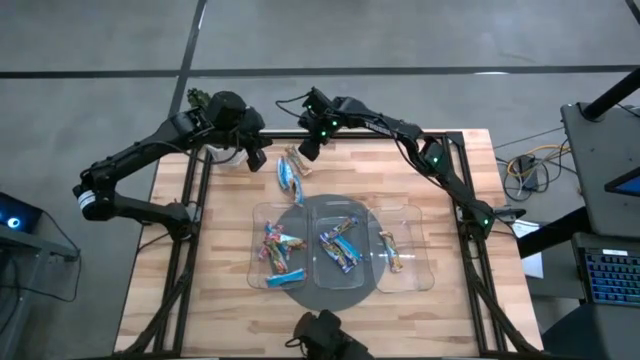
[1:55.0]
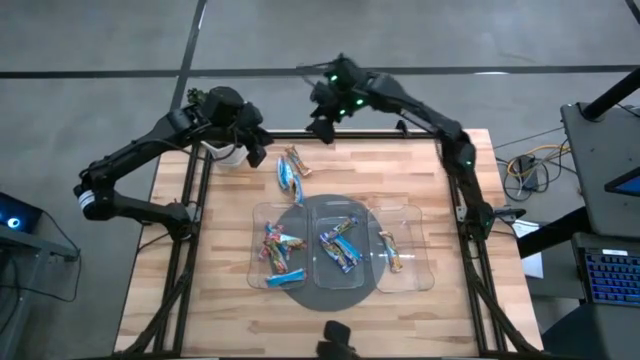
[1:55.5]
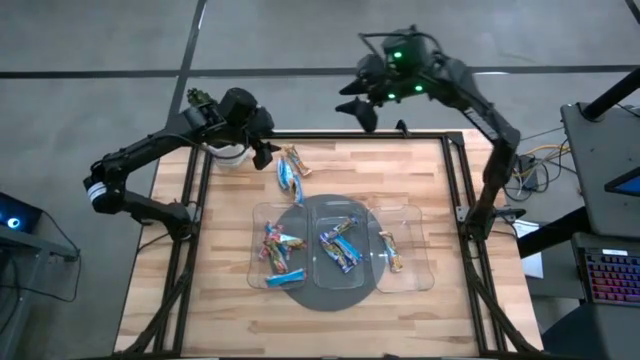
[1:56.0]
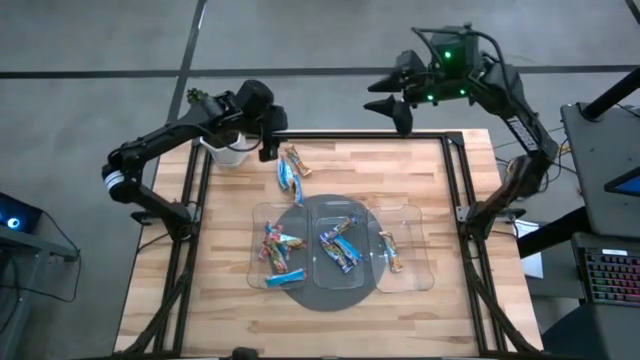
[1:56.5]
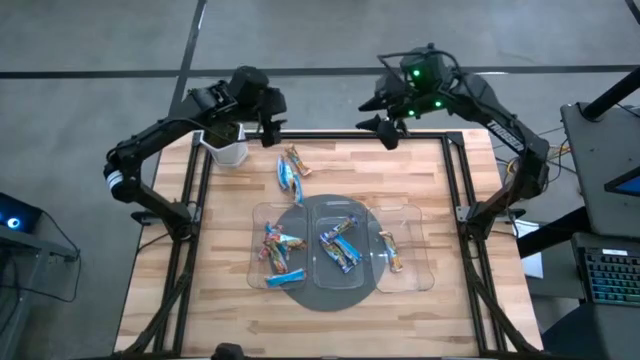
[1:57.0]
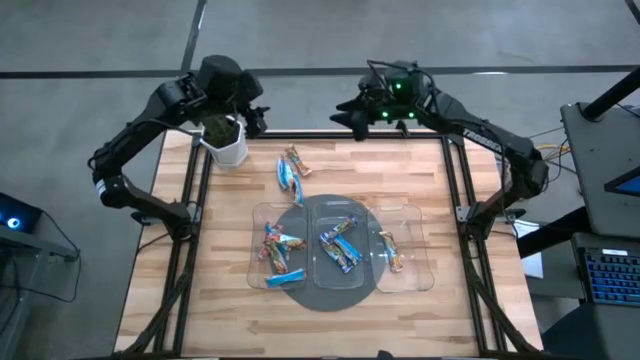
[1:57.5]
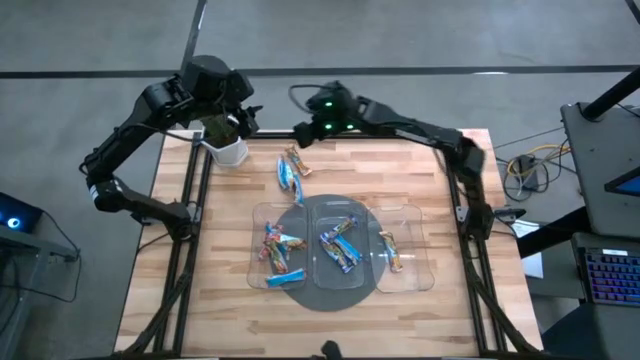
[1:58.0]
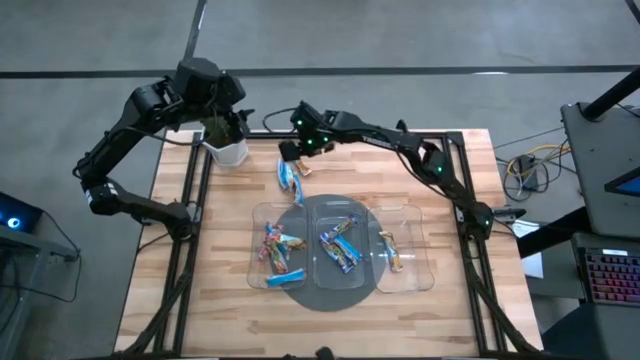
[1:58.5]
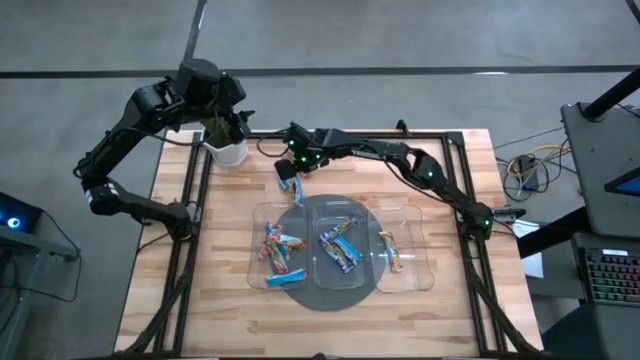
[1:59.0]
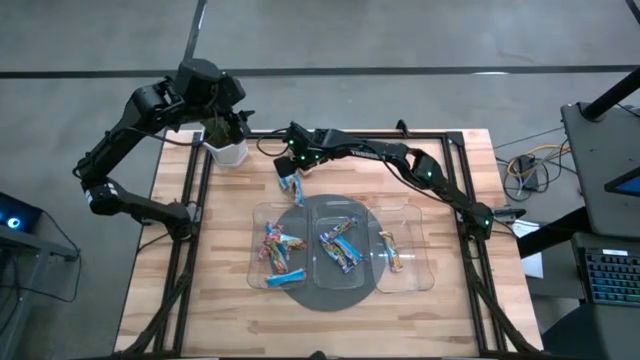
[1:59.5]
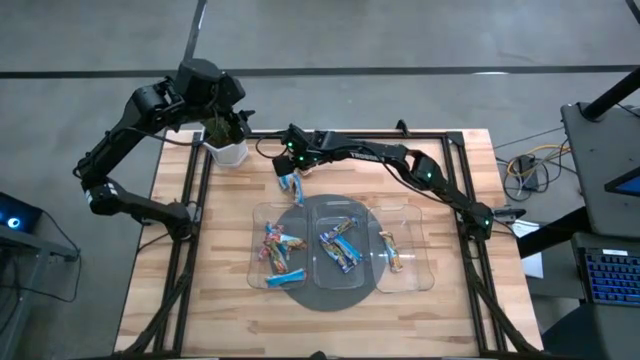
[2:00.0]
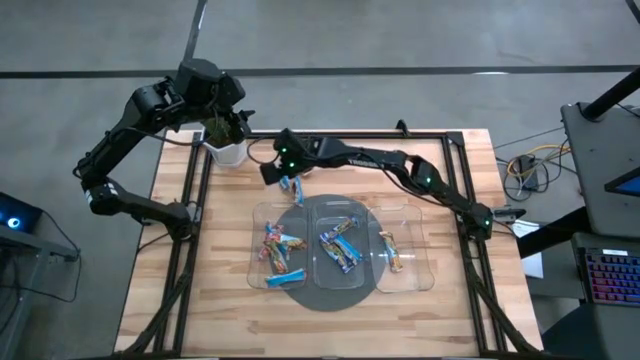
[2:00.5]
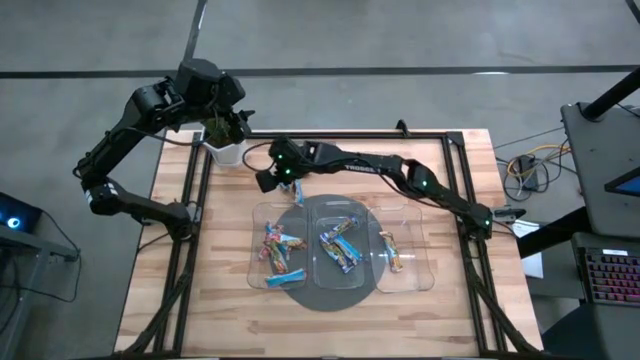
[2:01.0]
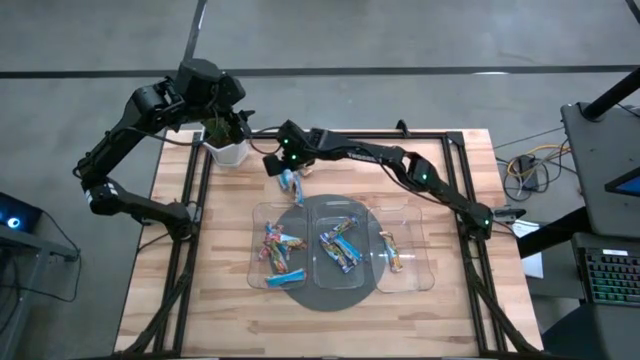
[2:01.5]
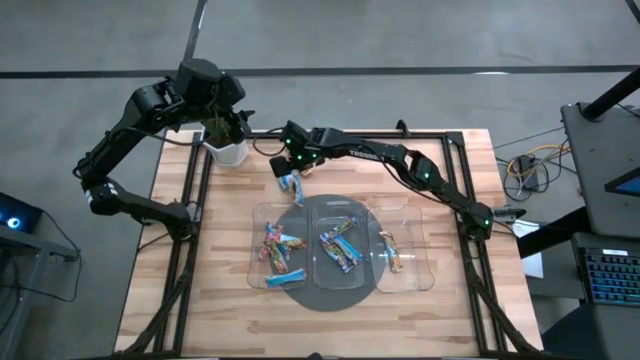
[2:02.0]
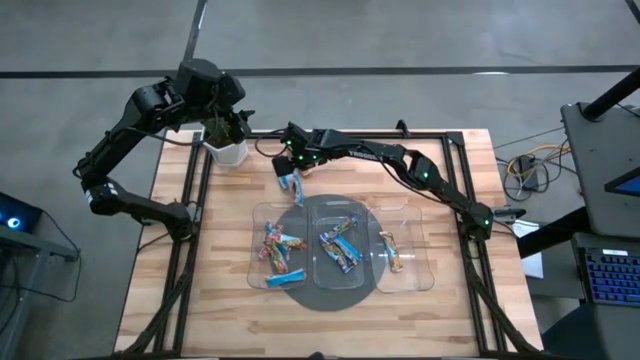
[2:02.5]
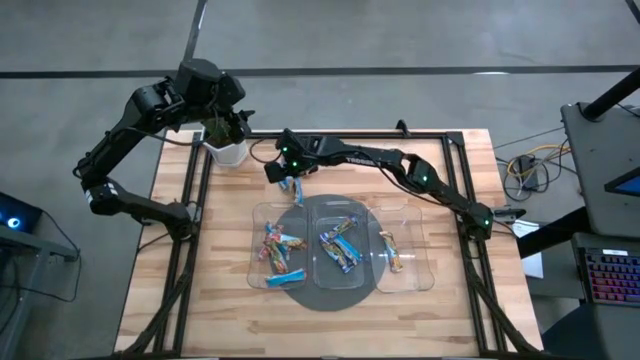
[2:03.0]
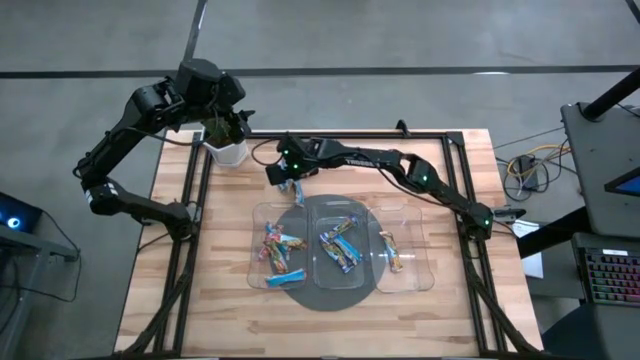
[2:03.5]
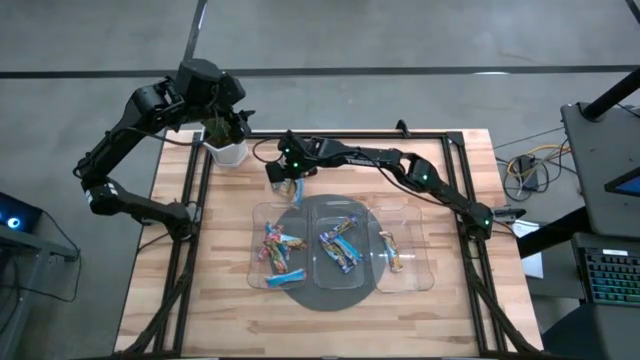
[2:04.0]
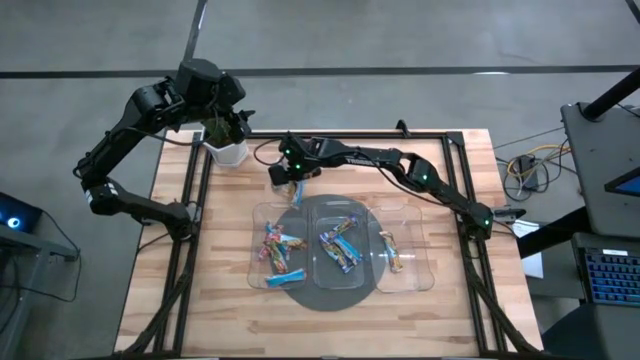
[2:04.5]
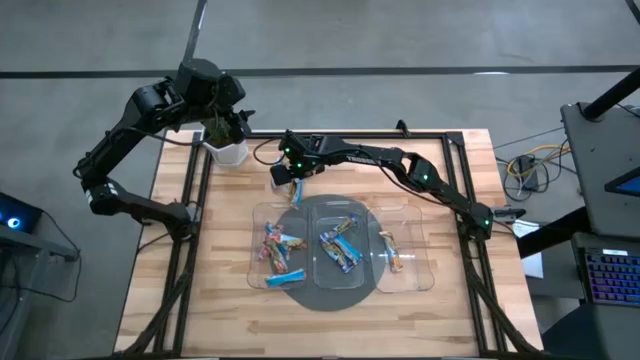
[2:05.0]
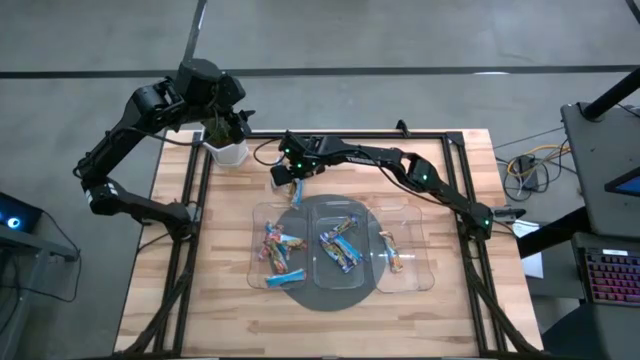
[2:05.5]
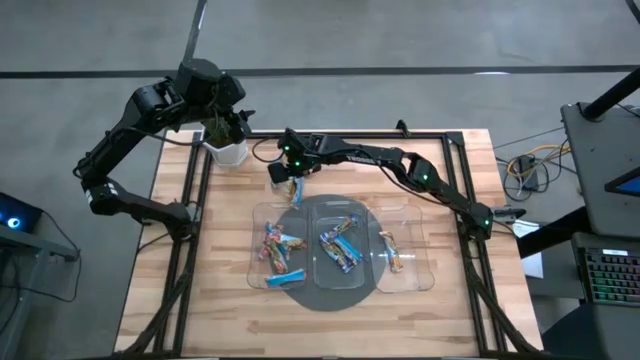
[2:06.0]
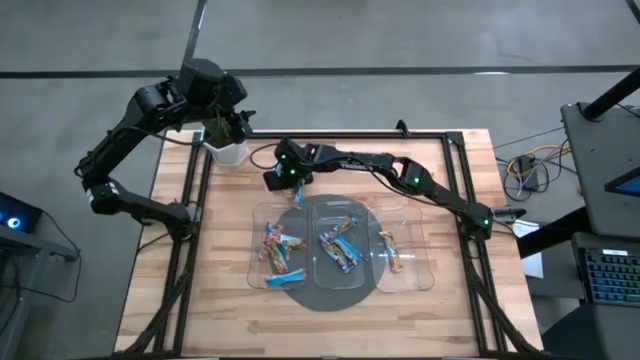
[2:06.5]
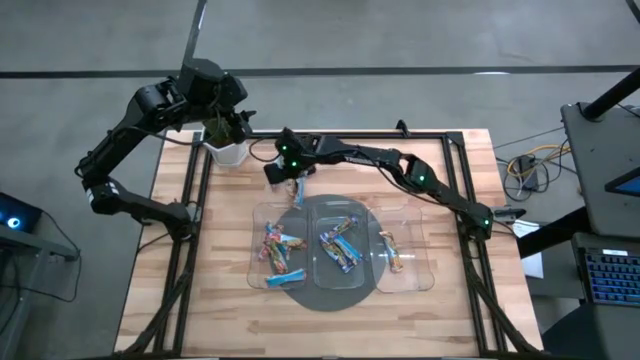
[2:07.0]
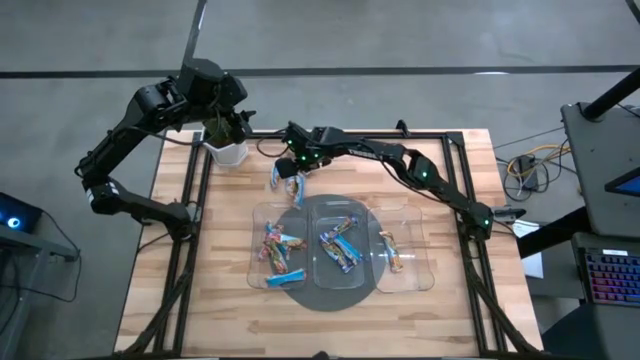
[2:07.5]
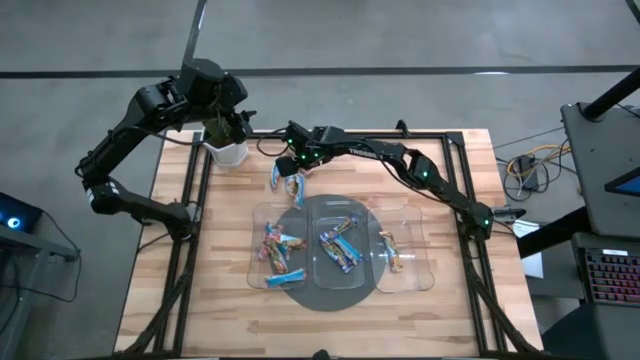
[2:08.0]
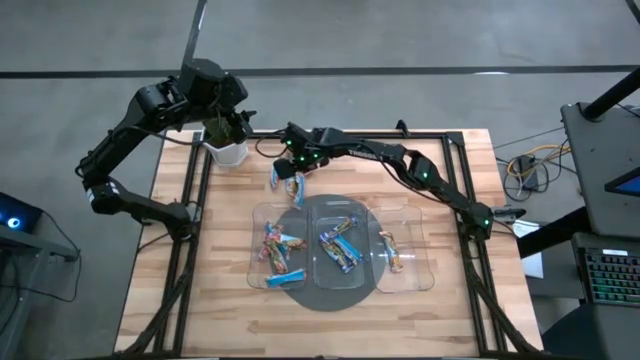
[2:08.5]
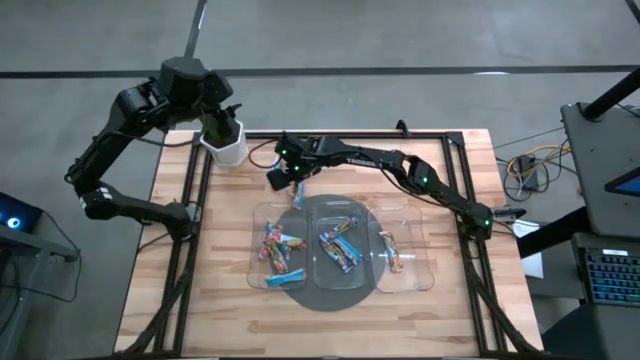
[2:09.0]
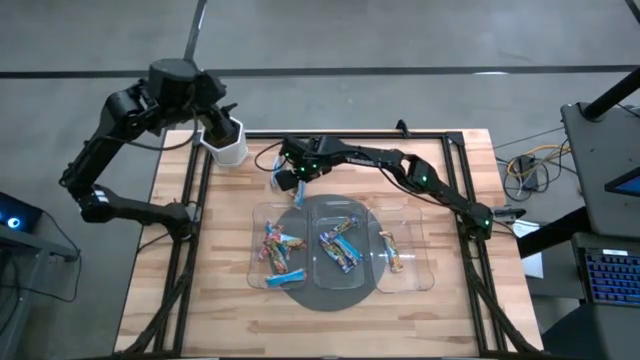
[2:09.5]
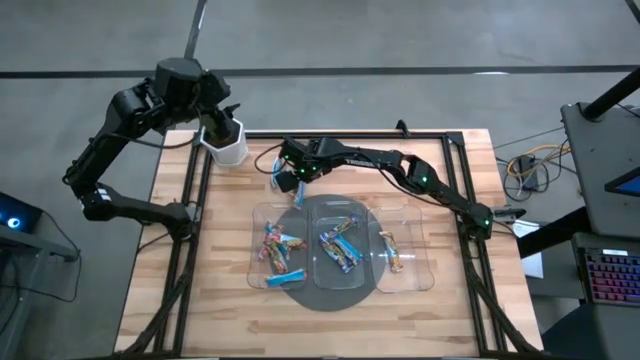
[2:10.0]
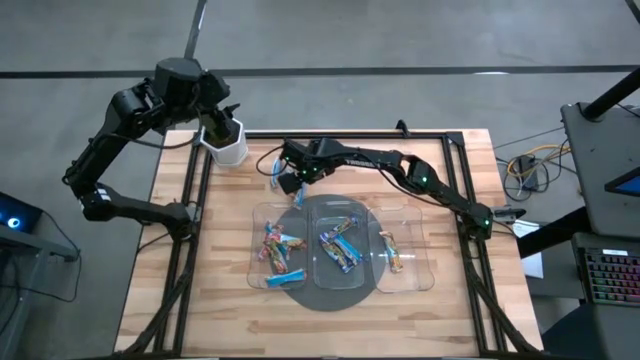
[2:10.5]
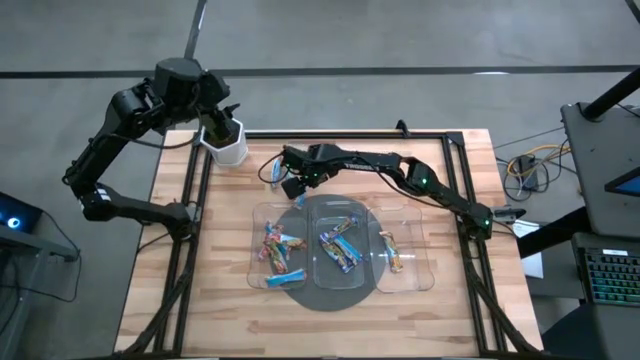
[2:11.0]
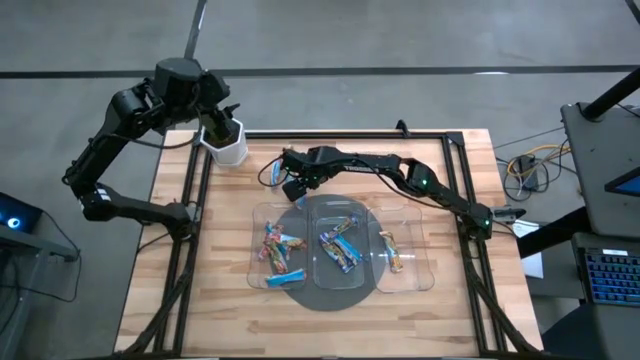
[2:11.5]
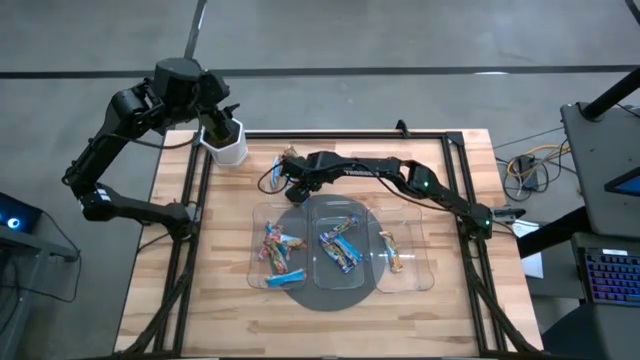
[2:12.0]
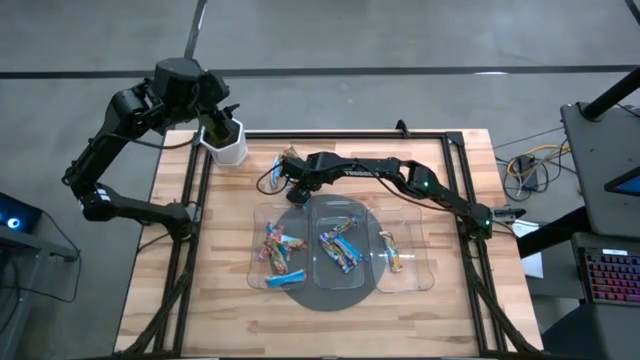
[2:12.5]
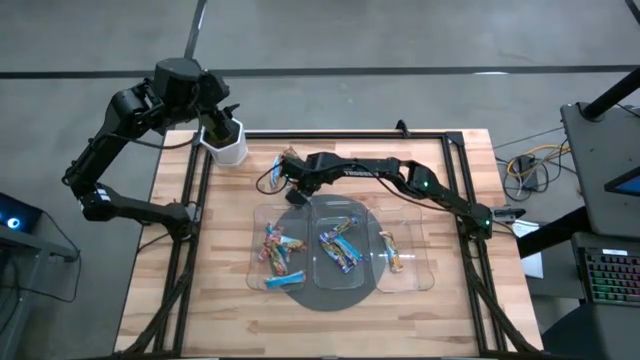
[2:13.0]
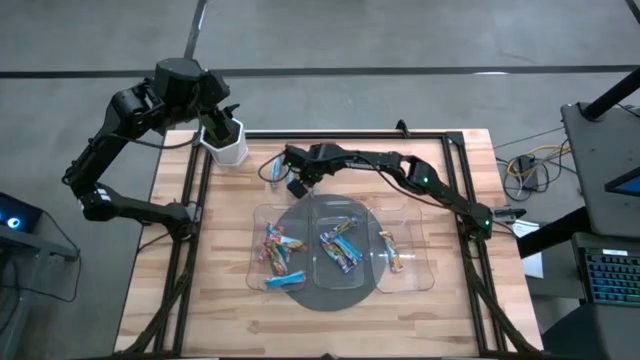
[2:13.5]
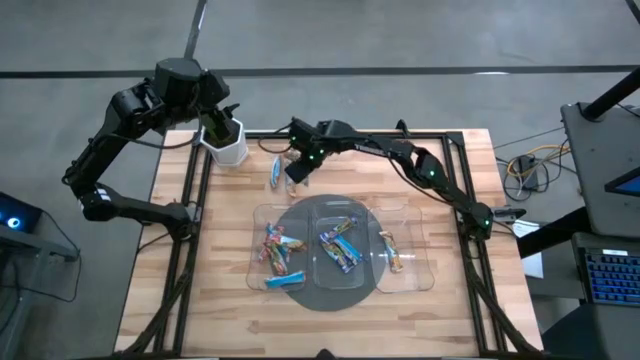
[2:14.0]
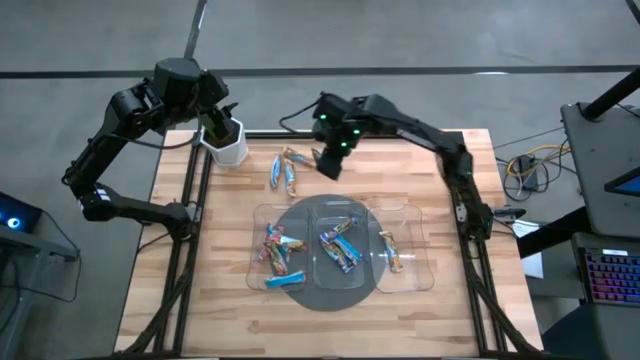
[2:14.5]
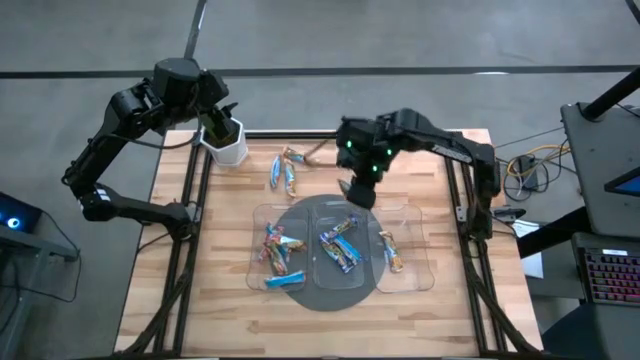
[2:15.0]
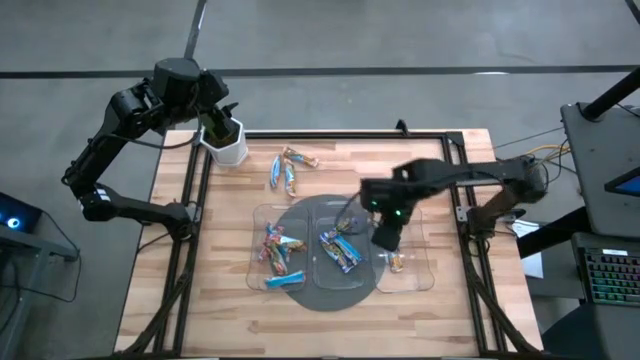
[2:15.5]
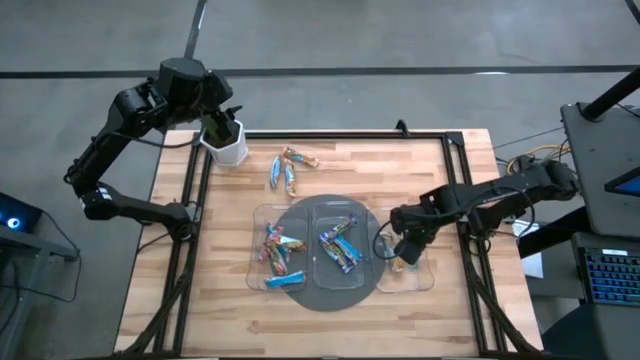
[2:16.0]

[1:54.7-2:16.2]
Task: Pick and place Granola Bars by type
Put the yellow granola bar into the right transparent bin

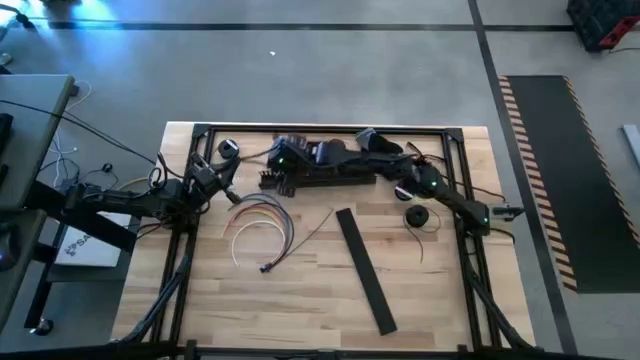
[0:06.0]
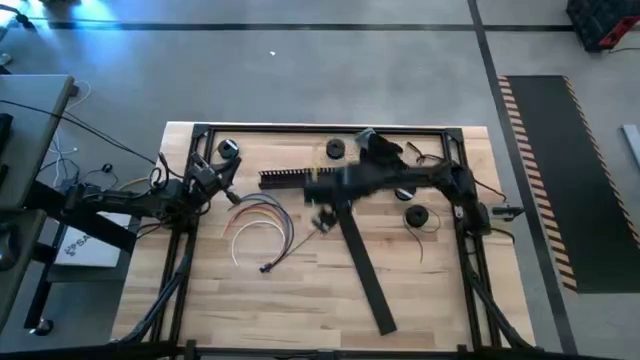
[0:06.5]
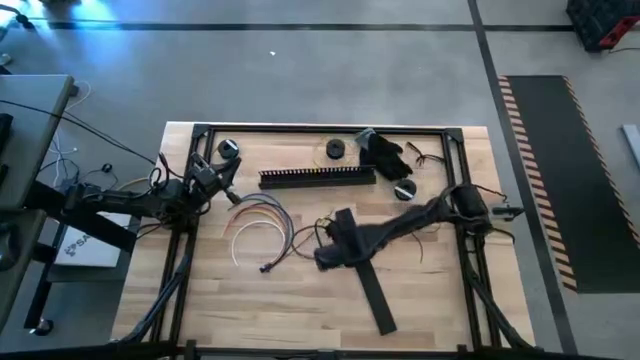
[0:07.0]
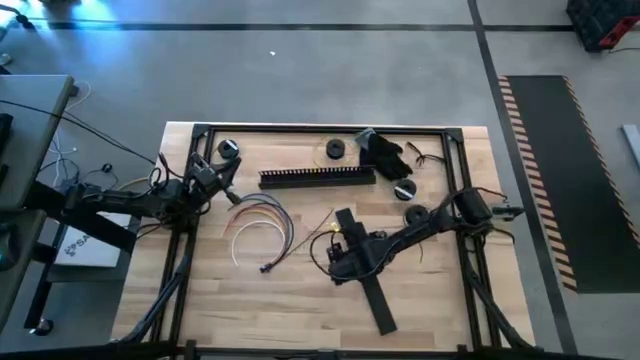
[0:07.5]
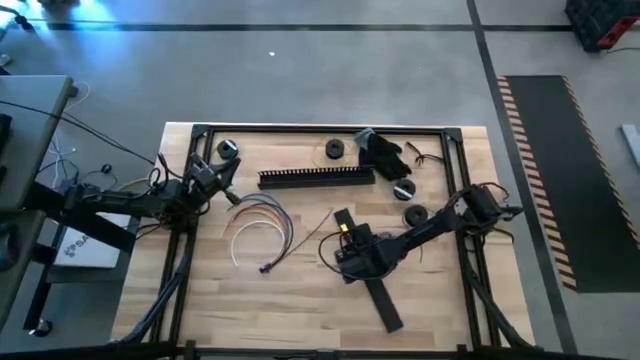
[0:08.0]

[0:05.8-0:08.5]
Task: Ziptie cables
Move the black cable duct cover to the top of the table
